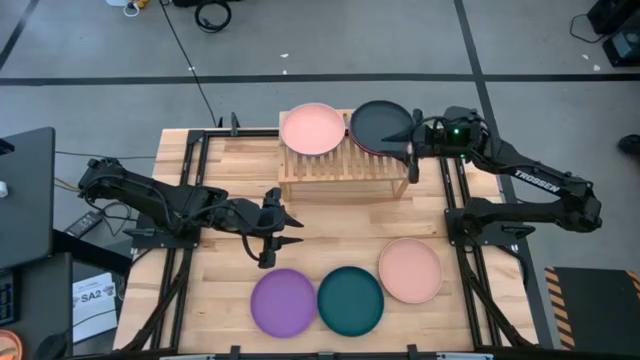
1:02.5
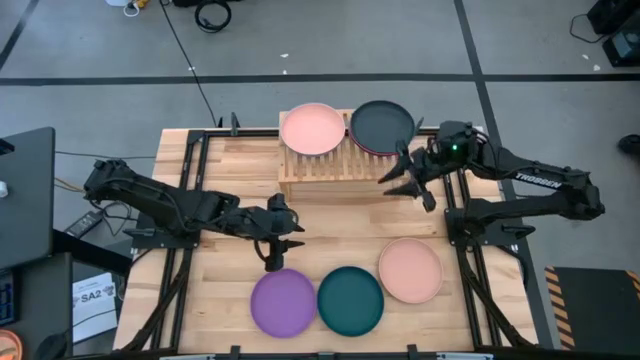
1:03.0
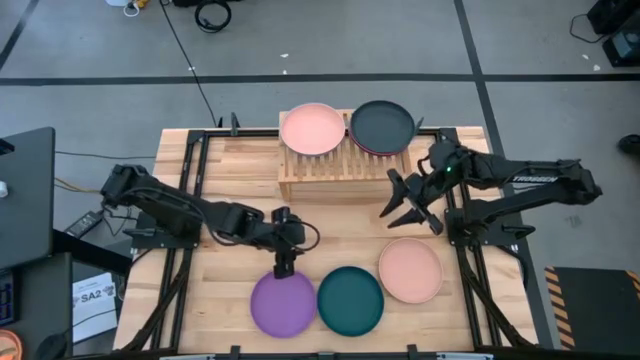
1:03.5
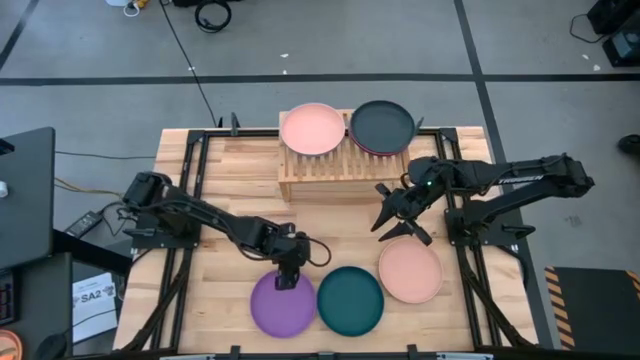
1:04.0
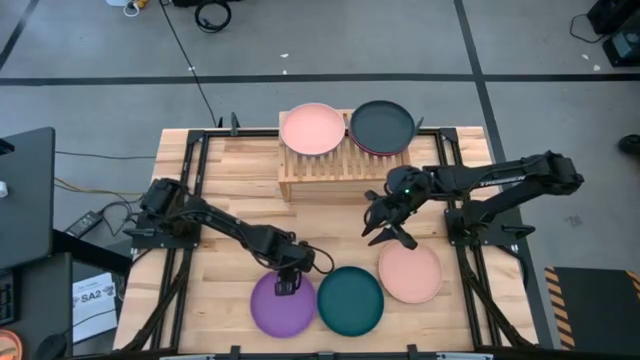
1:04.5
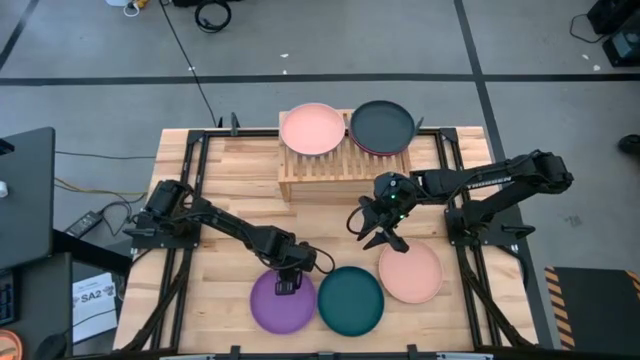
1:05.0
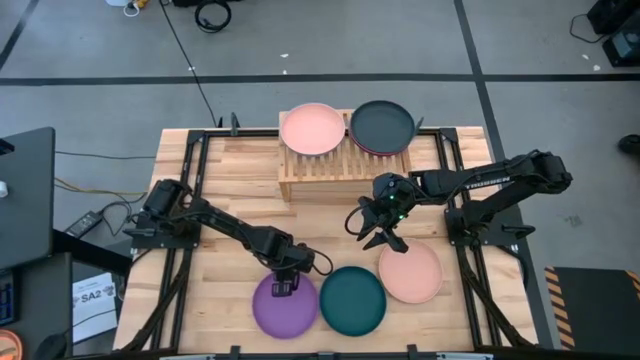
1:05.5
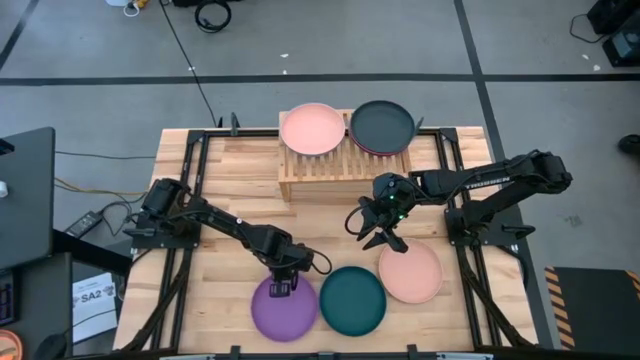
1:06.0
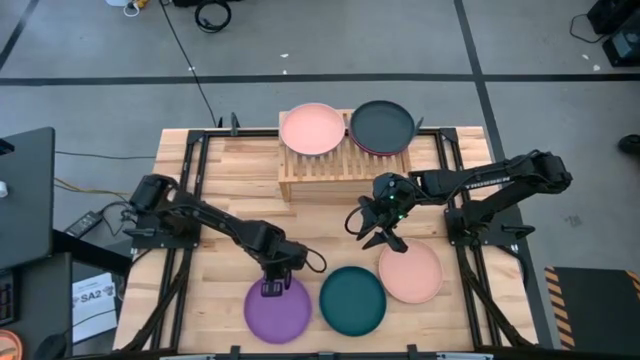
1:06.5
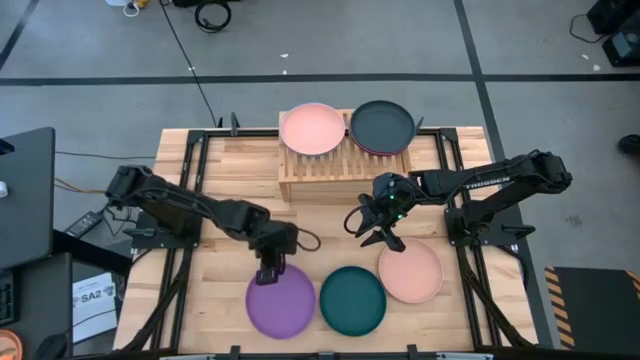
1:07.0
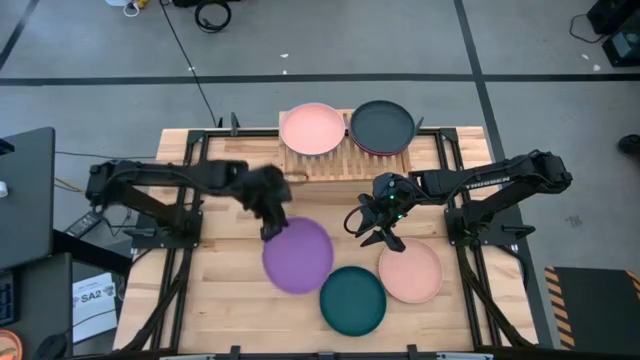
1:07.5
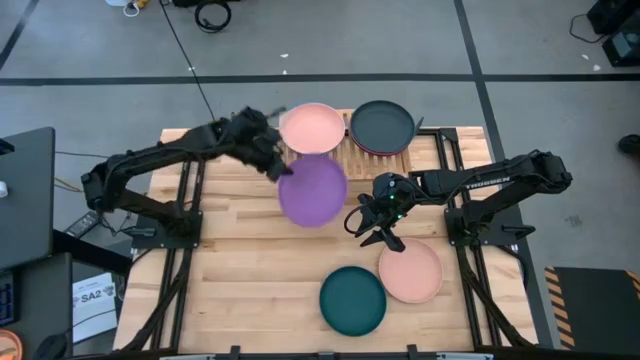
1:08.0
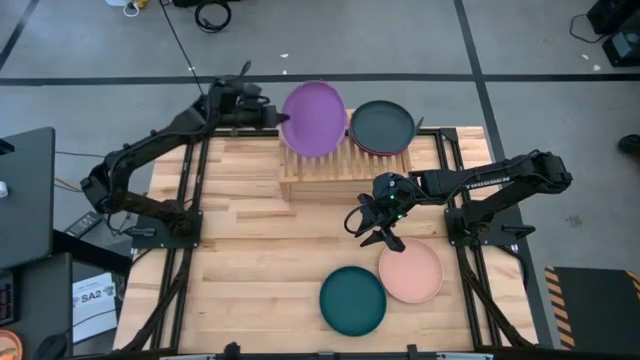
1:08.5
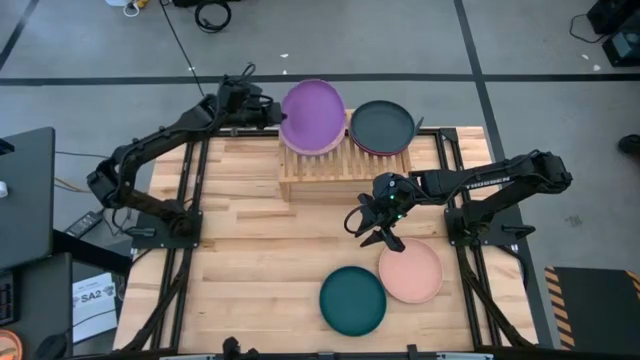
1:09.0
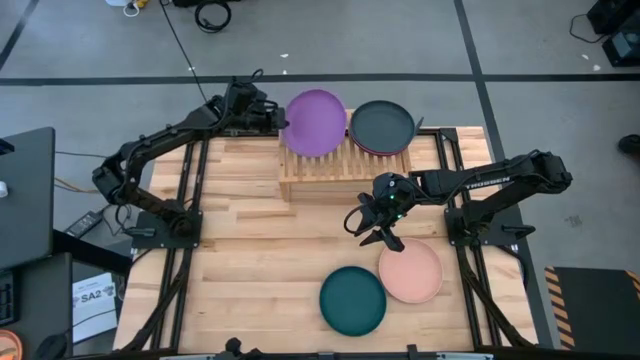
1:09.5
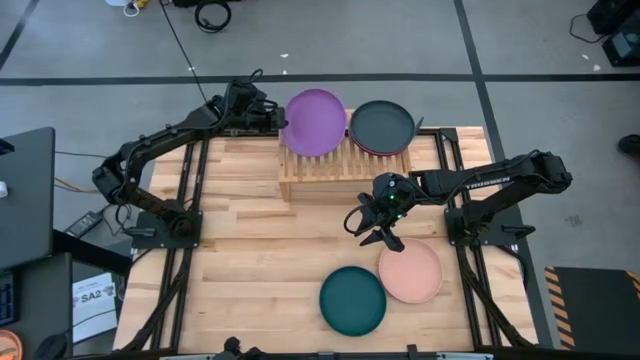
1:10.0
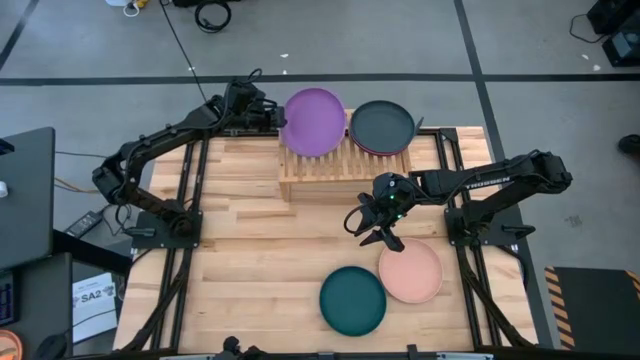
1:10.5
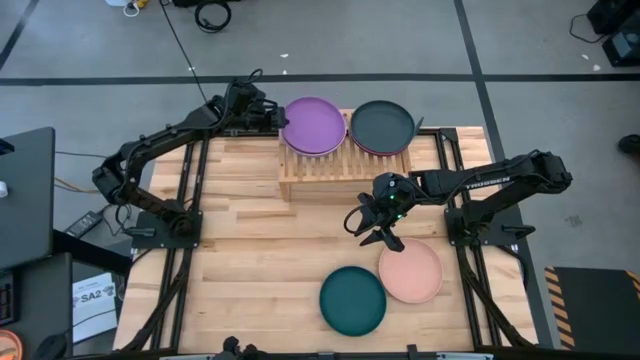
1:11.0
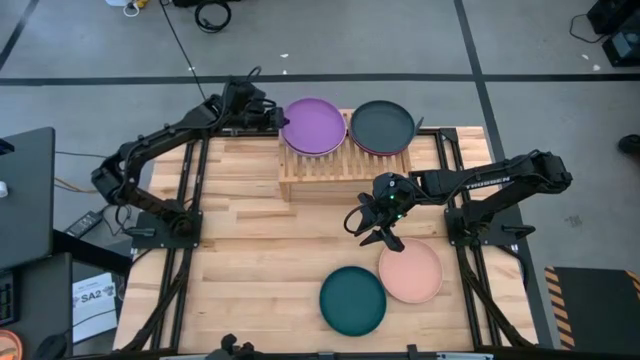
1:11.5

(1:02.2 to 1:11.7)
Task: Place and stack plates onto a shelf
Stack the purple plate on the light orange plate on the shelf

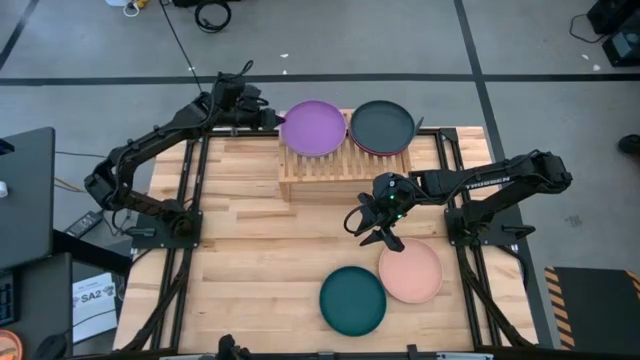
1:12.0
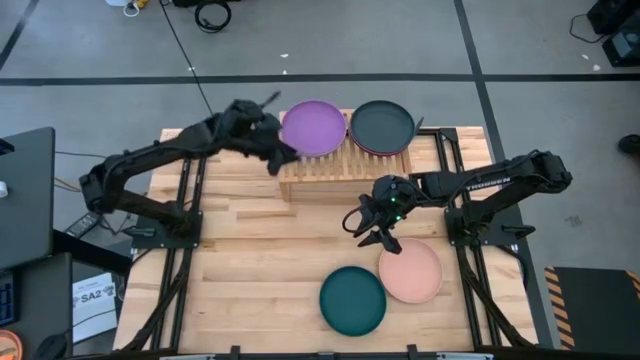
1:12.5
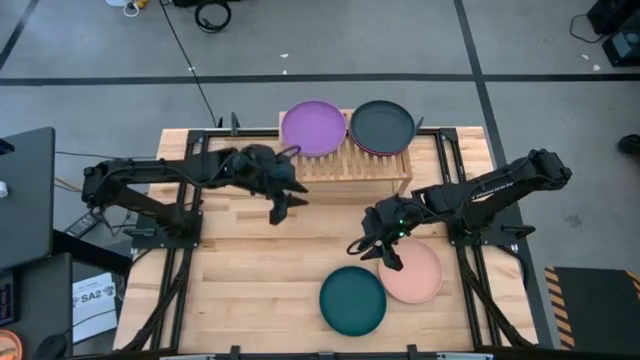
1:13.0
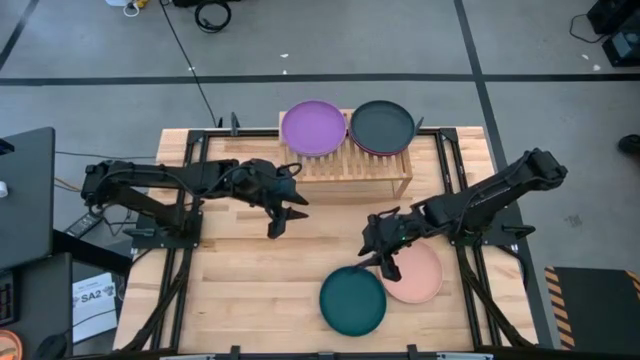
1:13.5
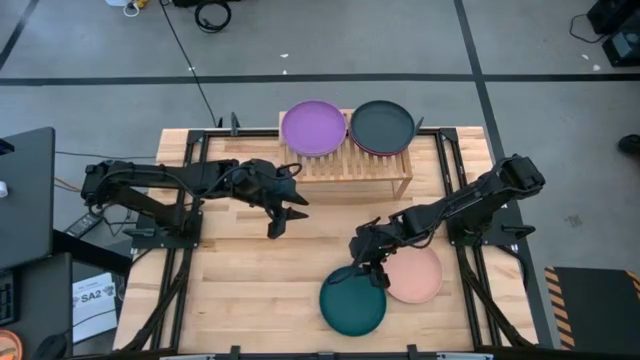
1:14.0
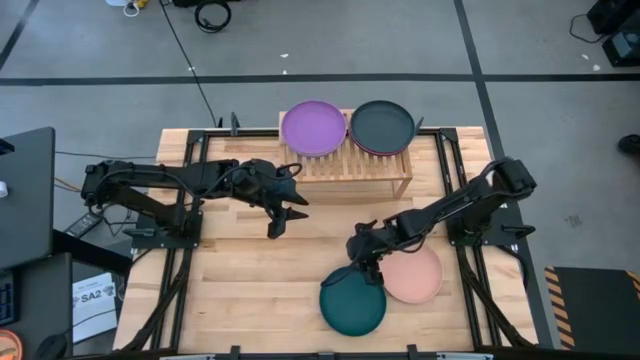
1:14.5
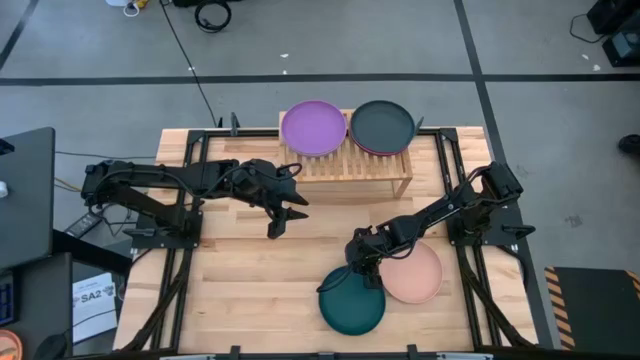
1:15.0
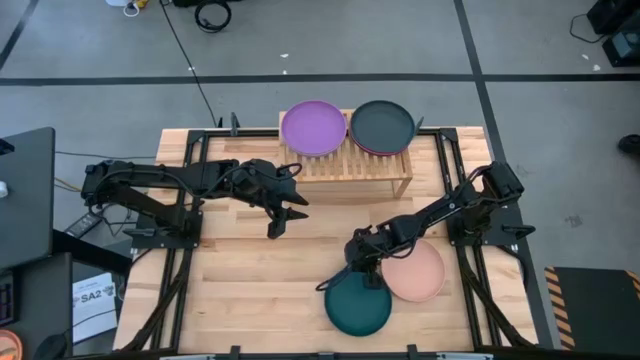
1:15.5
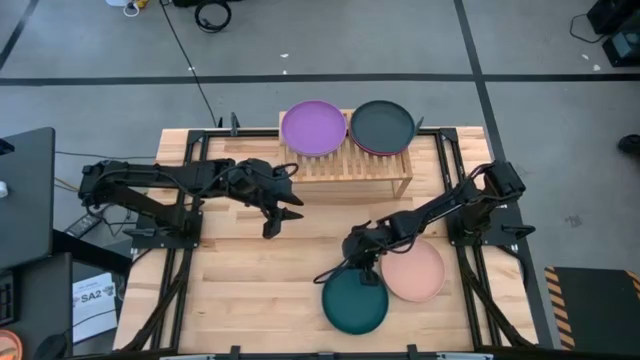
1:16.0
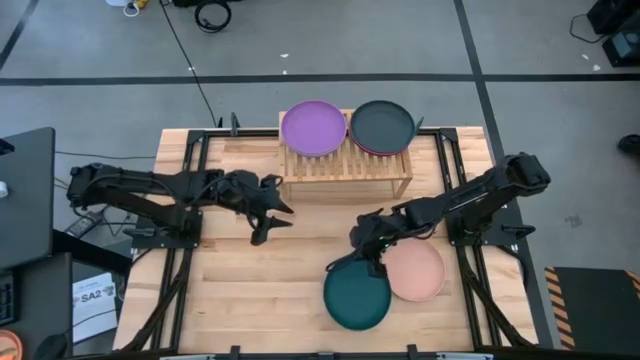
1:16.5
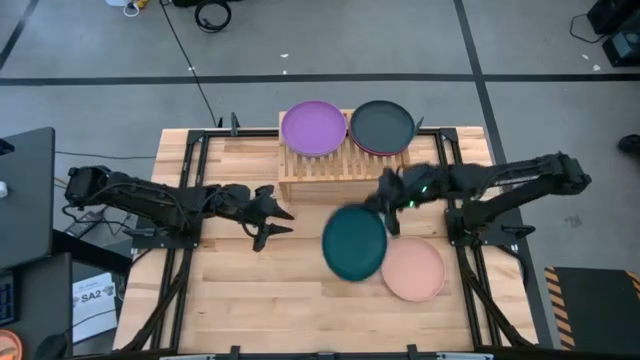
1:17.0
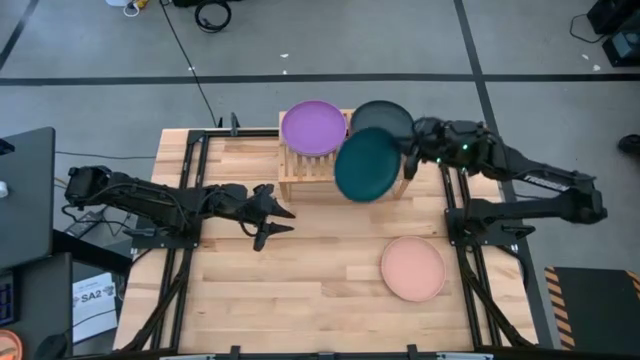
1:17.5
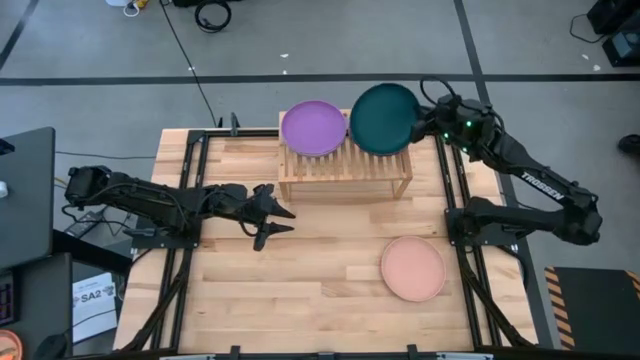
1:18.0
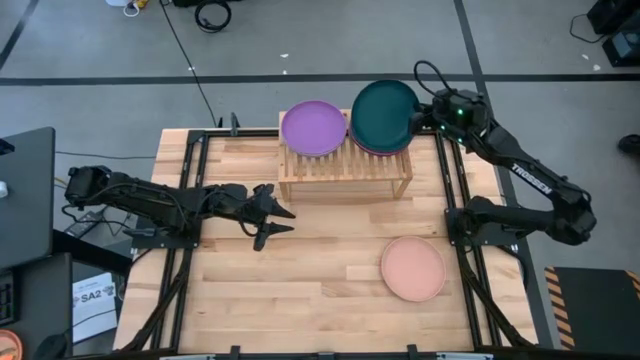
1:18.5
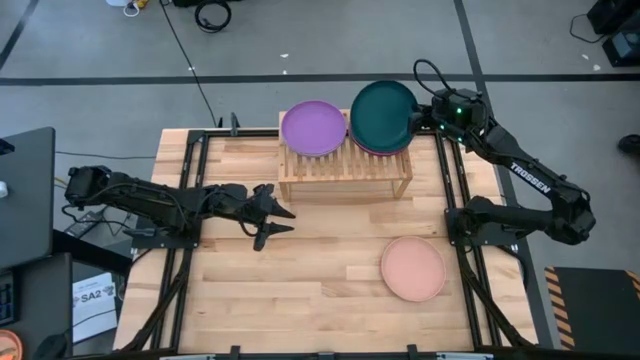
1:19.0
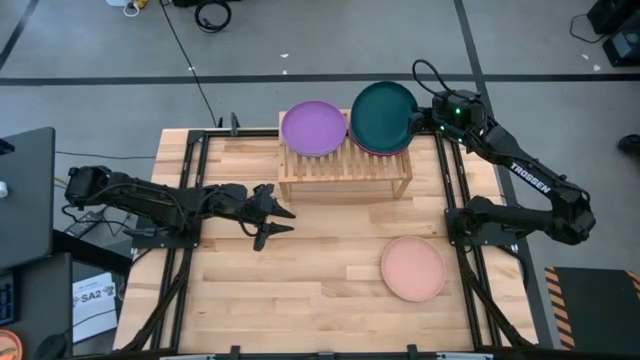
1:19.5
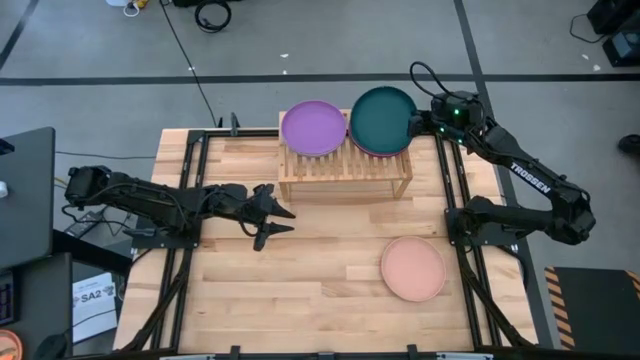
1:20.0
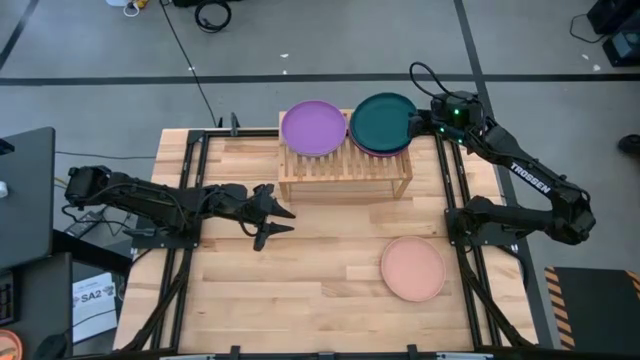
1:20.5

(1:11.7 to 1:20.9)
Stack the dark green plate on the black plate on the shelf

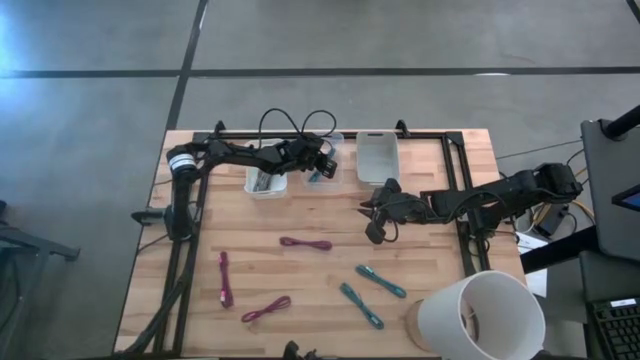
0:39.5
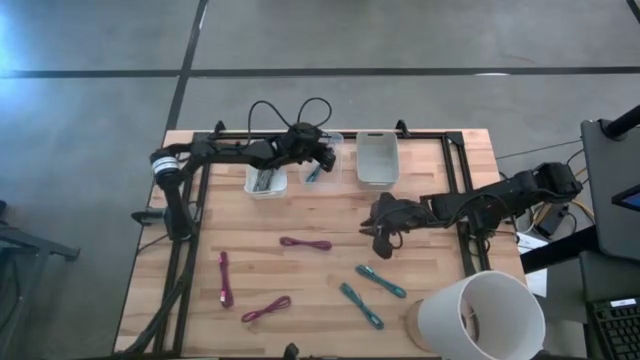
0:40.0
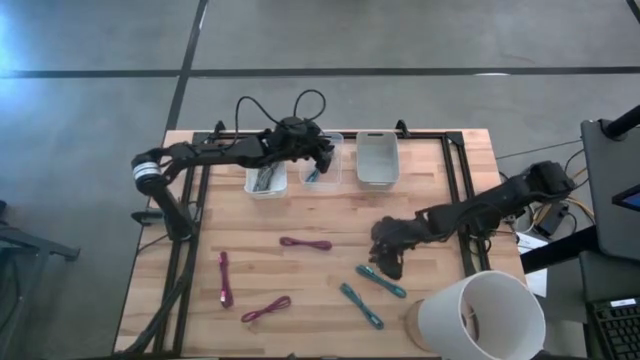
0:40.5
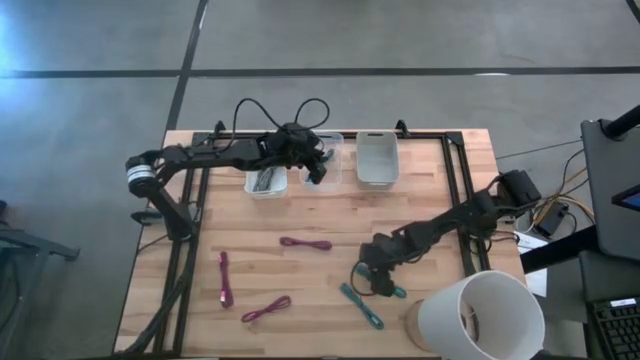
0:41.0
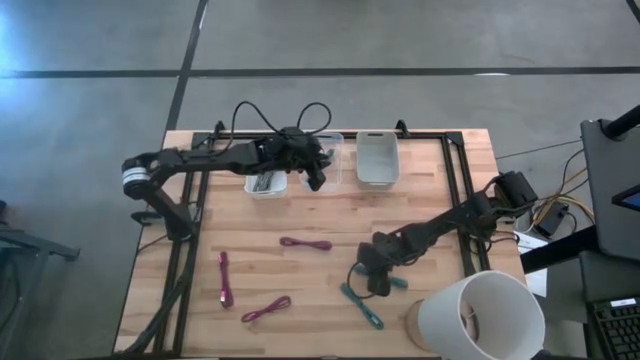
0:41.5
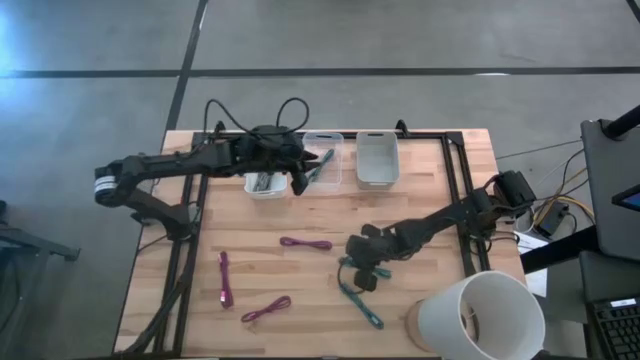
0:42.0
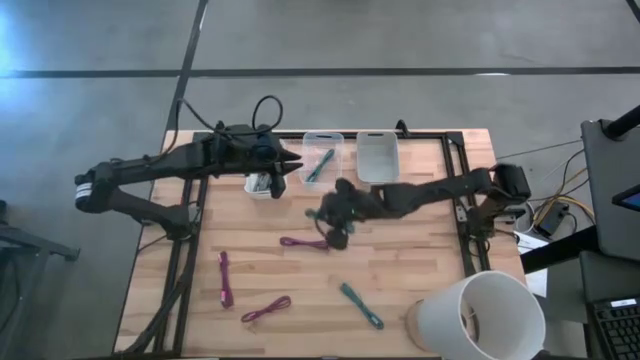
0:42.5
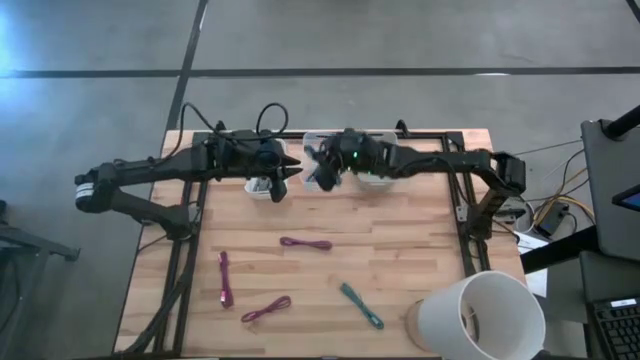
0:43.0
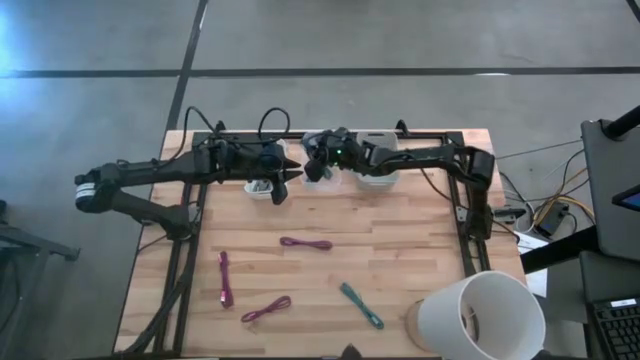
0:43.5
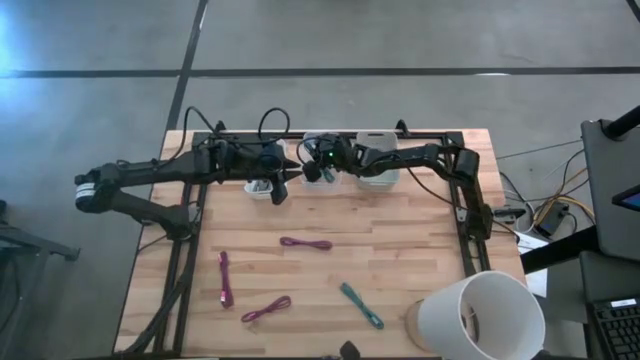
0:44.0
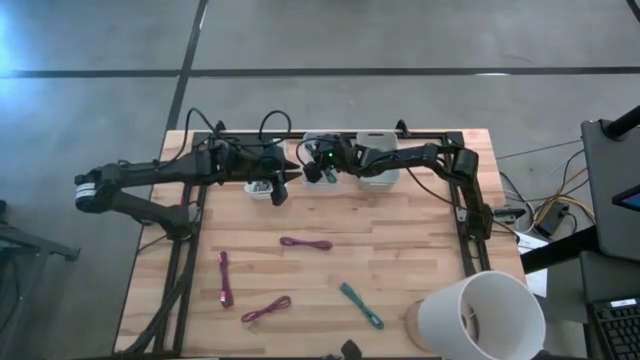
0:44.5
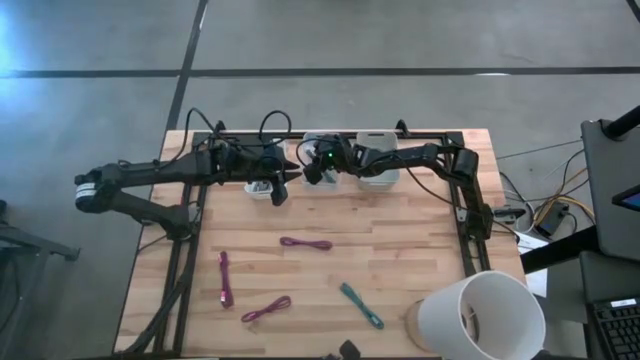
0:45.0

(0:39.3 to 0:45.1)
Task: Pick & Place USB Port
Put the right blue charger cable into the transparent bin
